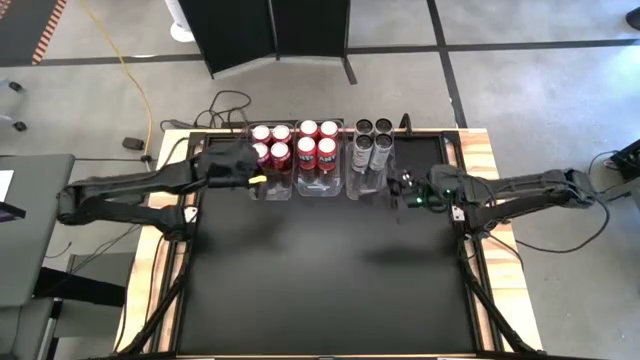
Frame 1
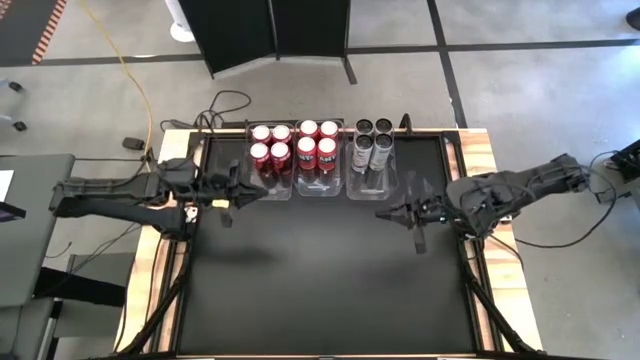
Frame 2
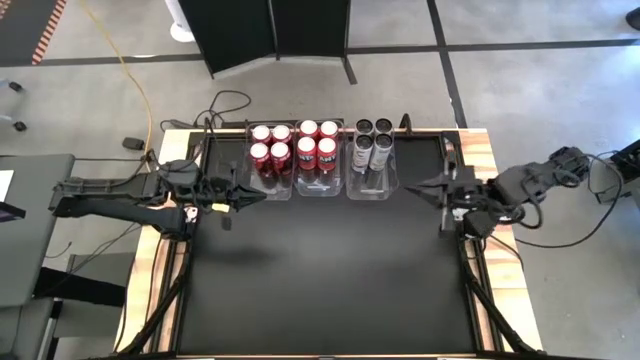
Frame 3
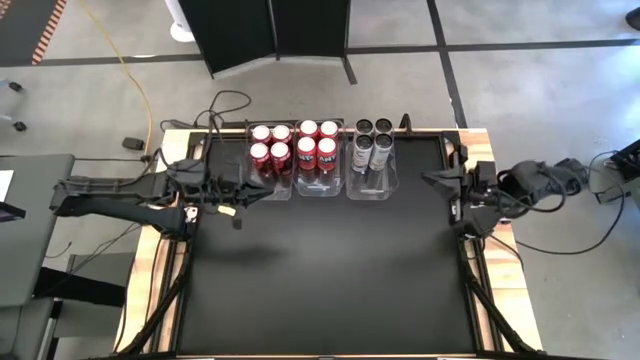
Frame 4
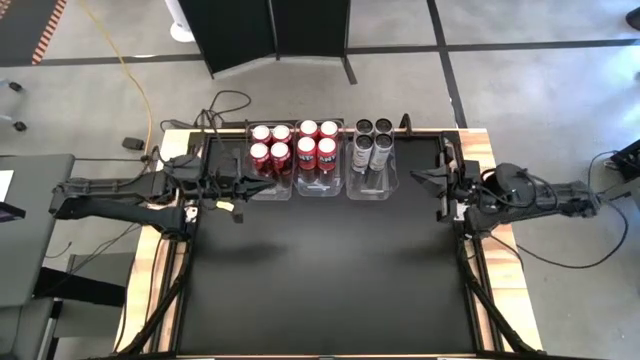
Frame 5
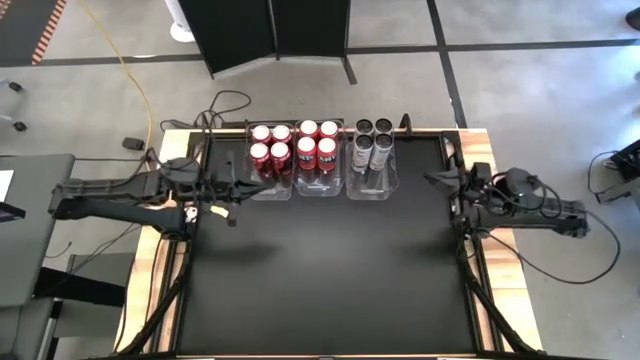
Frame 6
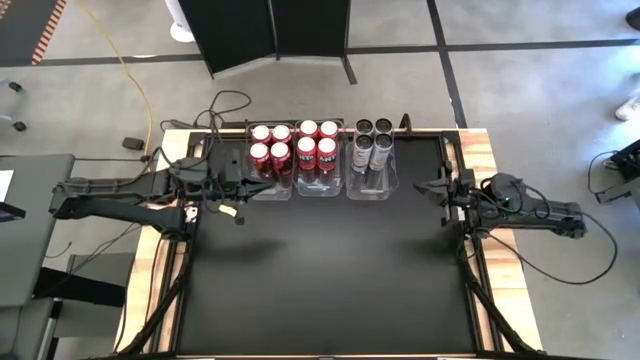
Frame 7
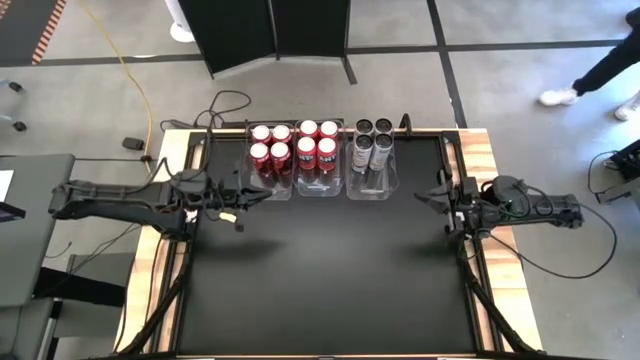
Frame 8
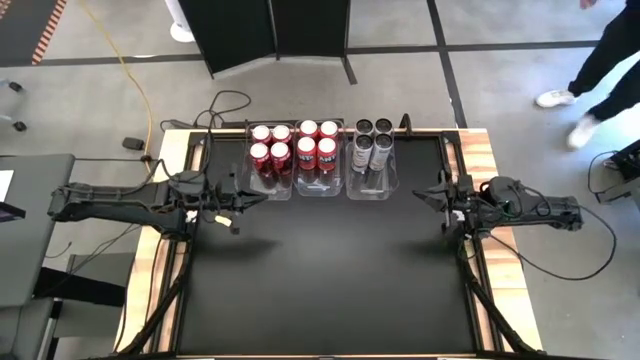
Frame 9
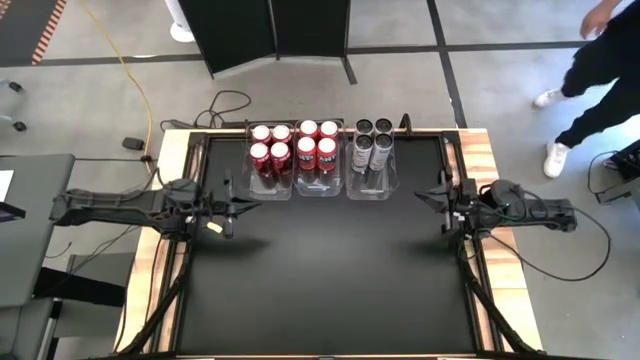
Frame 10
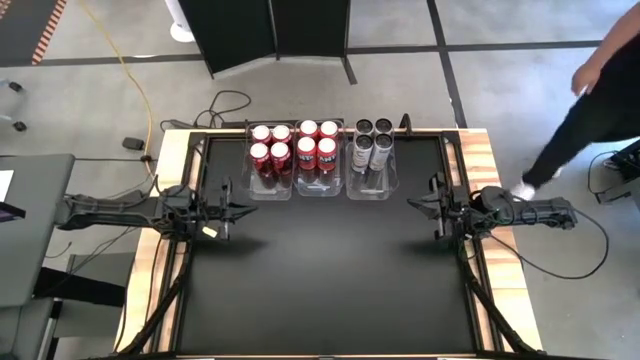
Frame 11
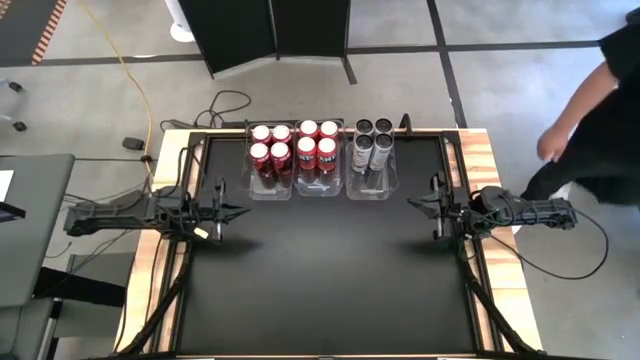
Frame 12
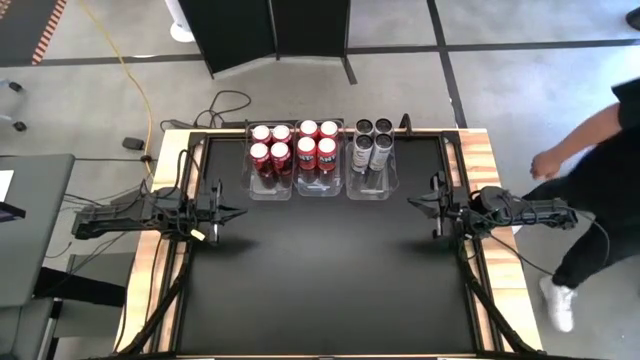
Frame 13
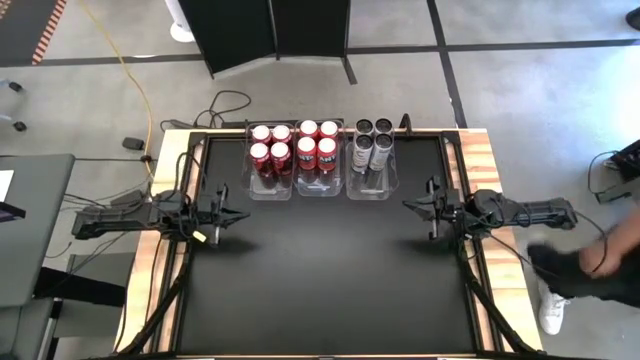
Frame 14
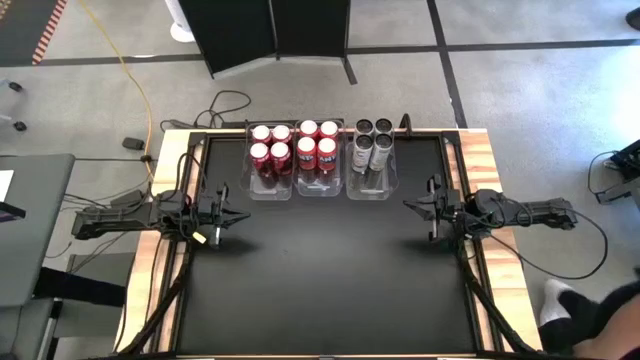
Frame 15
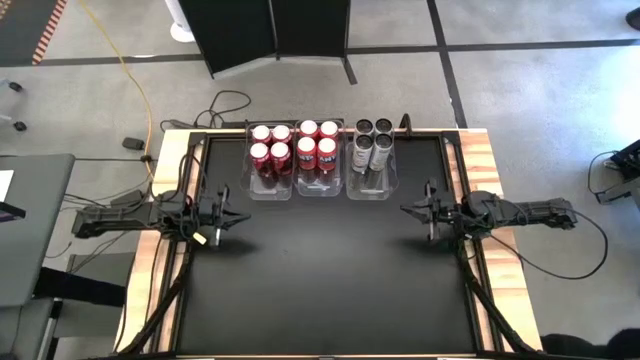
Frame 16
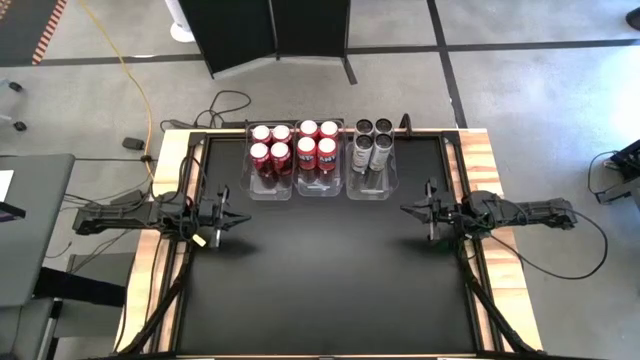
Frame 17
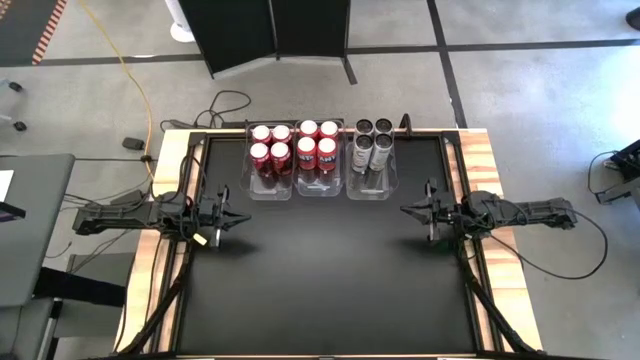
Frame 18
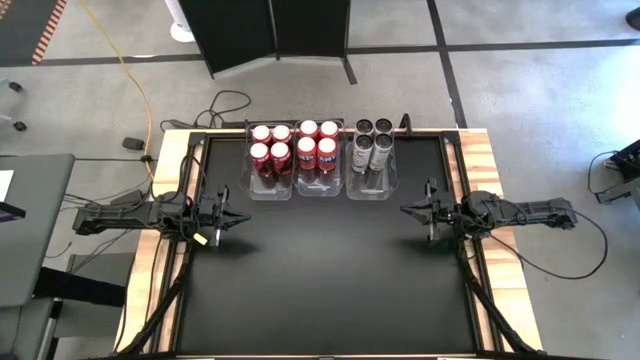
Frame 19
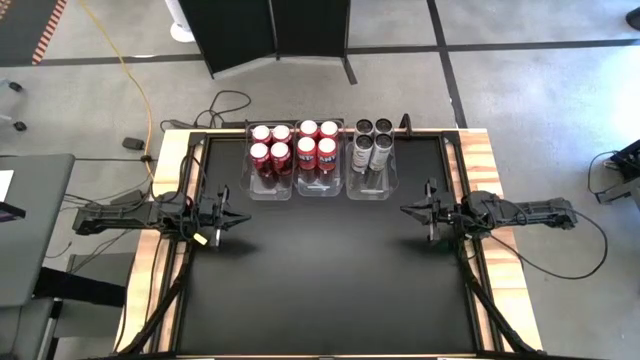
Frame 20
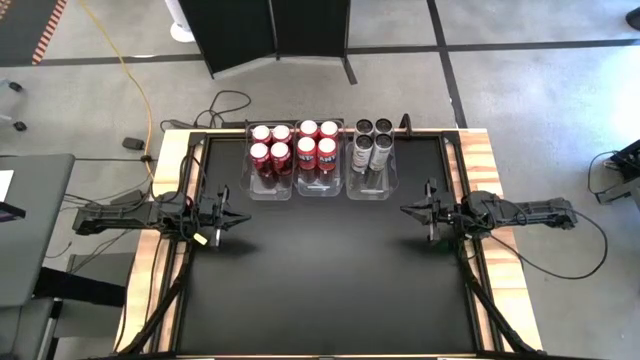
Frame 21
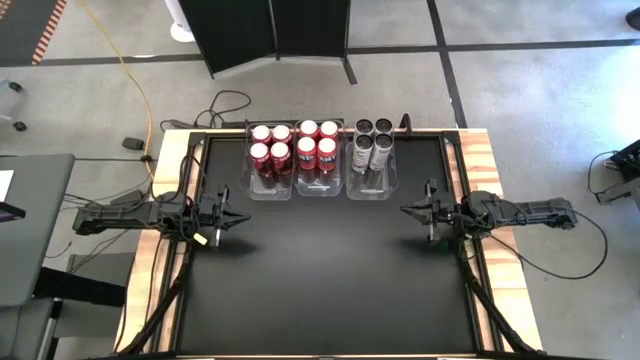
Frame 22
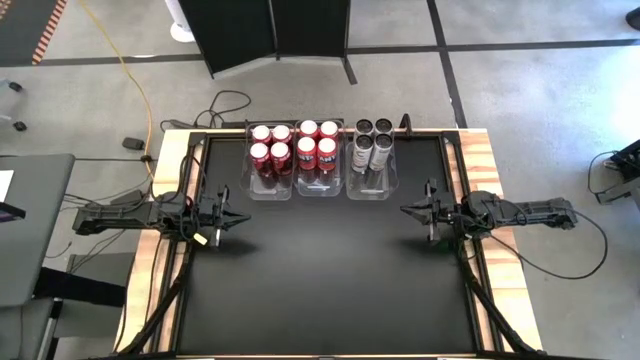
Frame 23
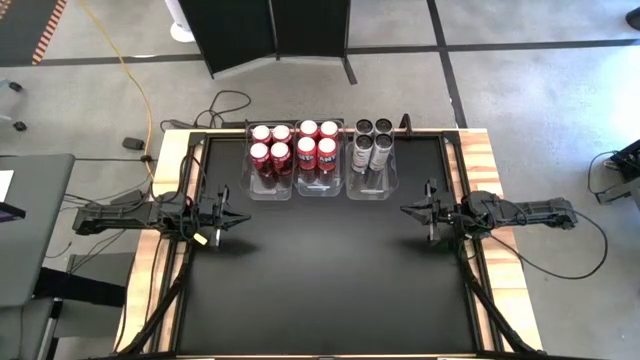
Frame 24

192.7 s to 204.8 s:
Task: Sort soda cans
Return to Home Position

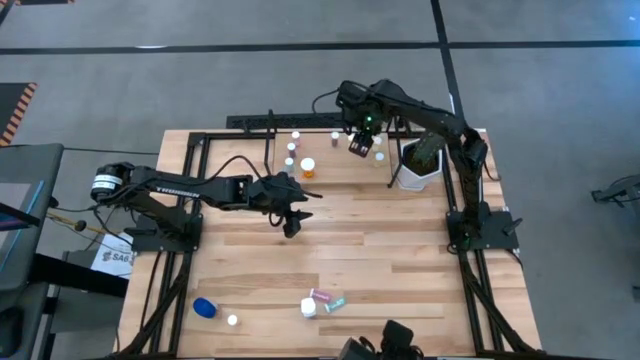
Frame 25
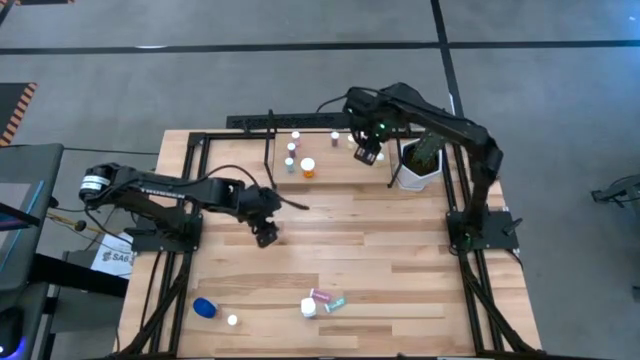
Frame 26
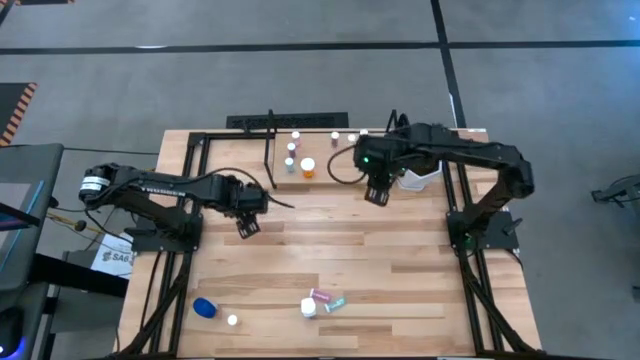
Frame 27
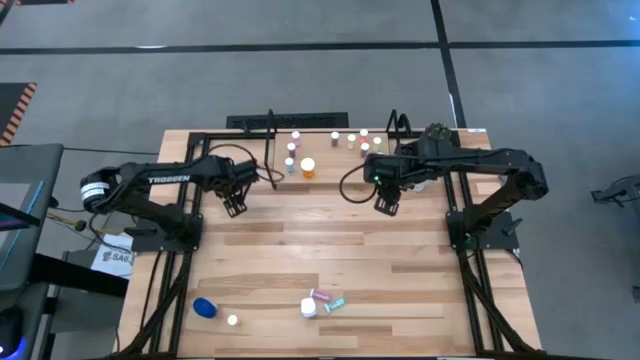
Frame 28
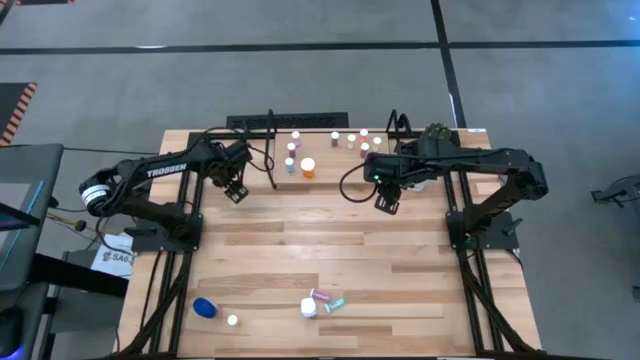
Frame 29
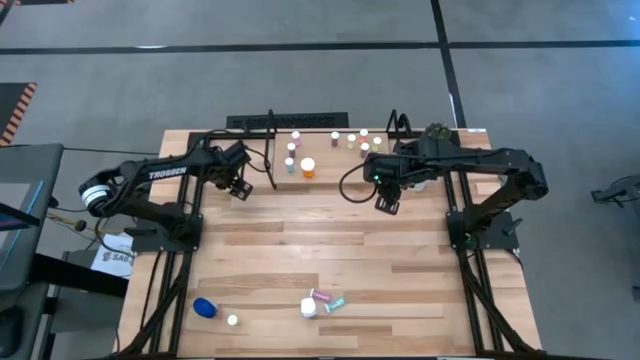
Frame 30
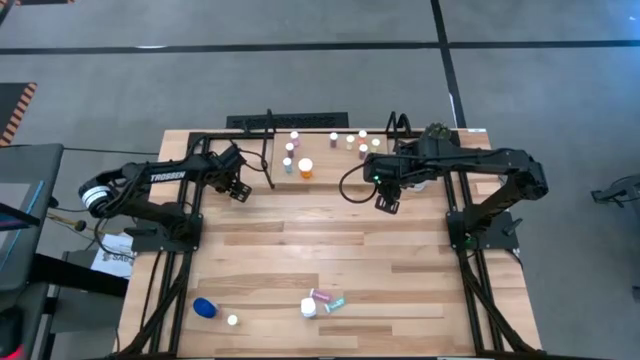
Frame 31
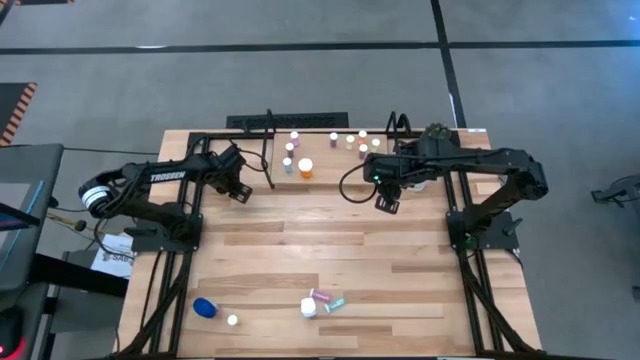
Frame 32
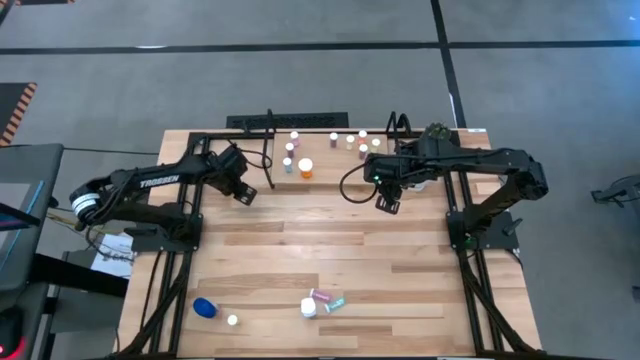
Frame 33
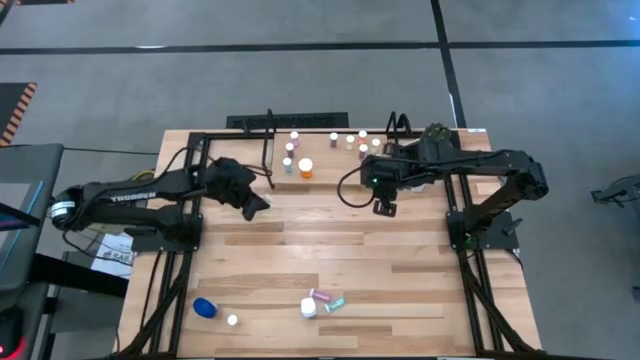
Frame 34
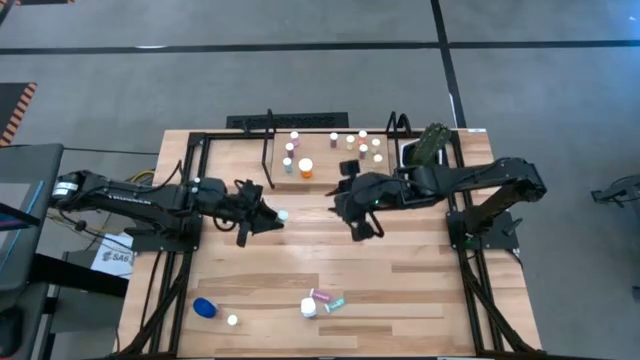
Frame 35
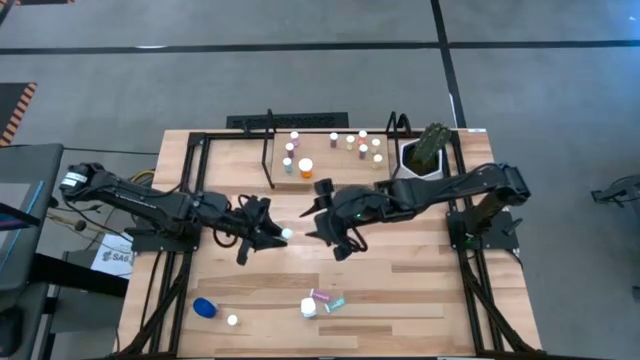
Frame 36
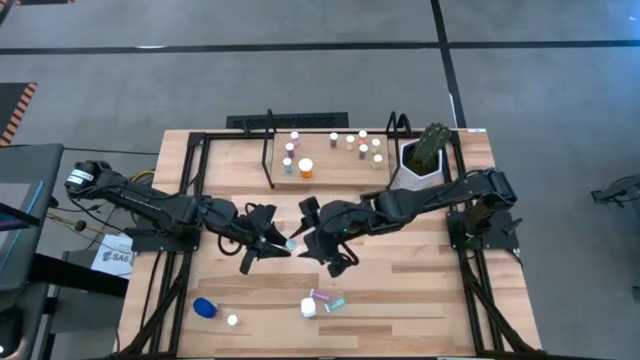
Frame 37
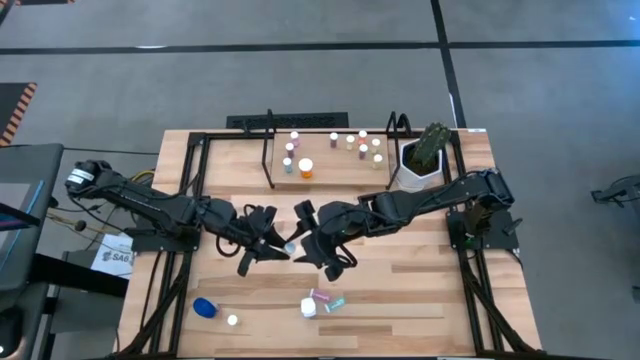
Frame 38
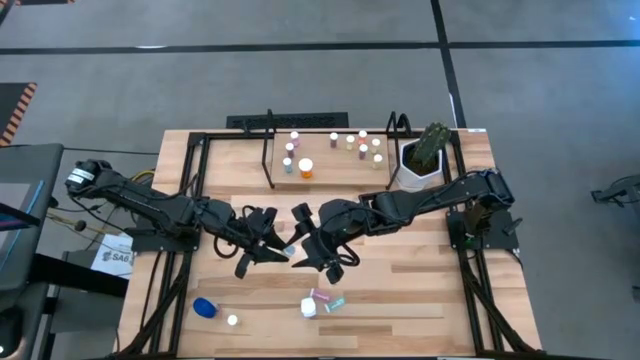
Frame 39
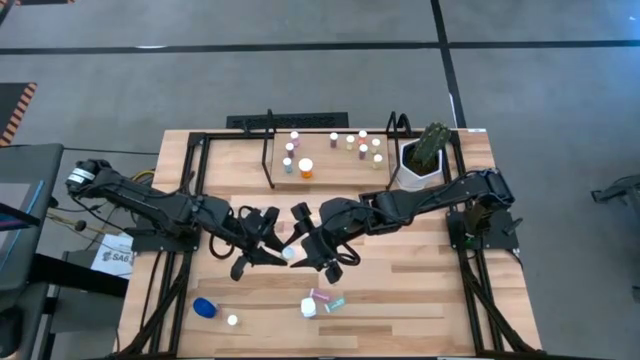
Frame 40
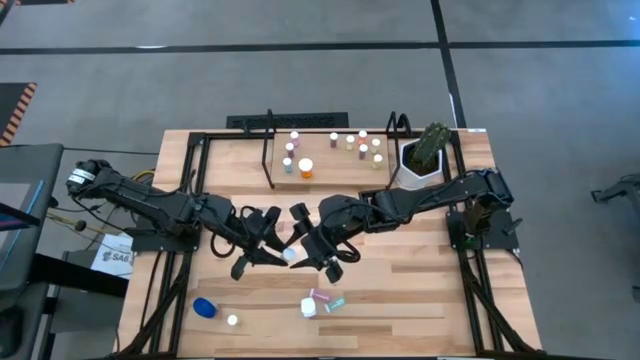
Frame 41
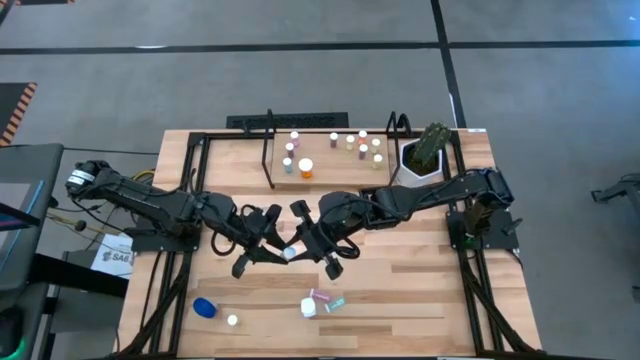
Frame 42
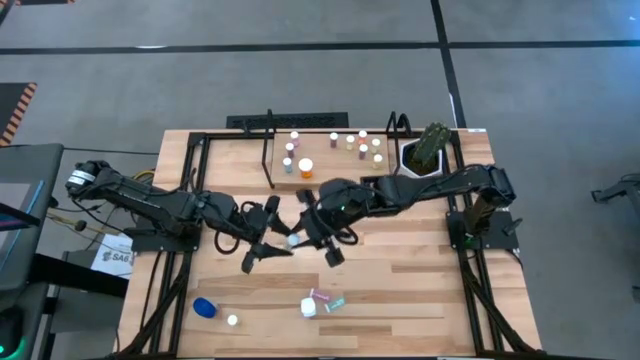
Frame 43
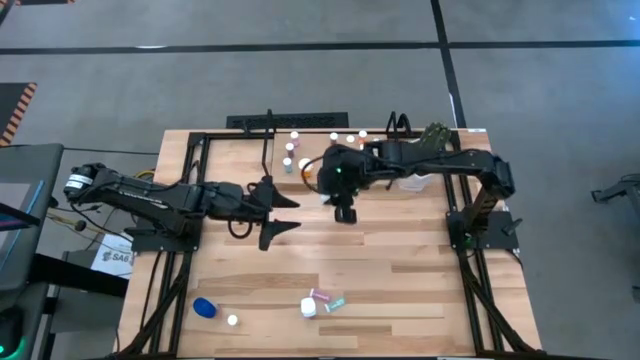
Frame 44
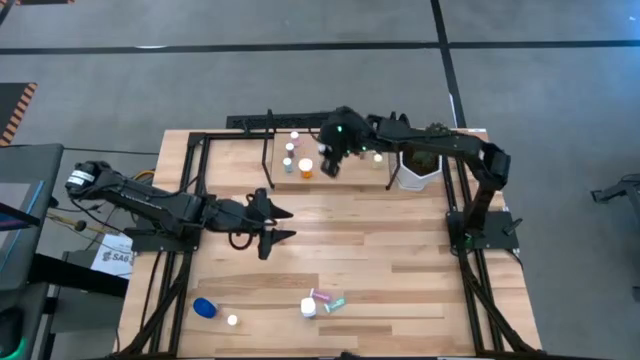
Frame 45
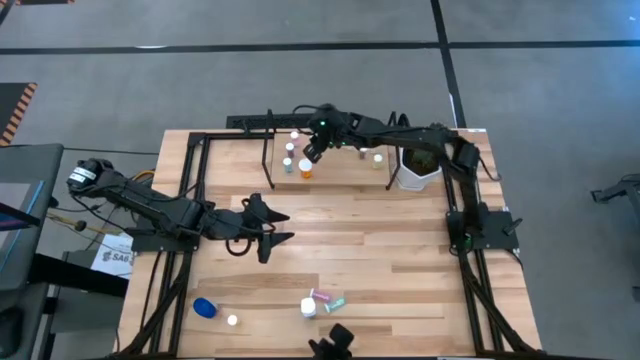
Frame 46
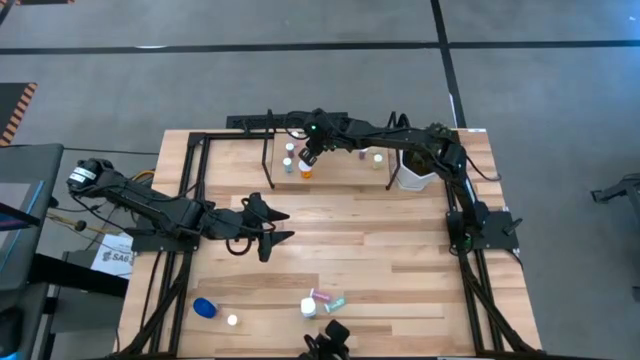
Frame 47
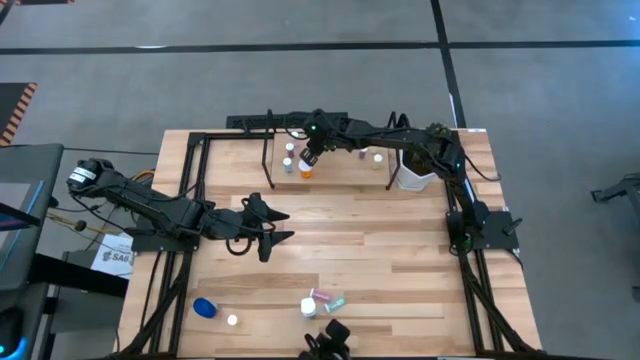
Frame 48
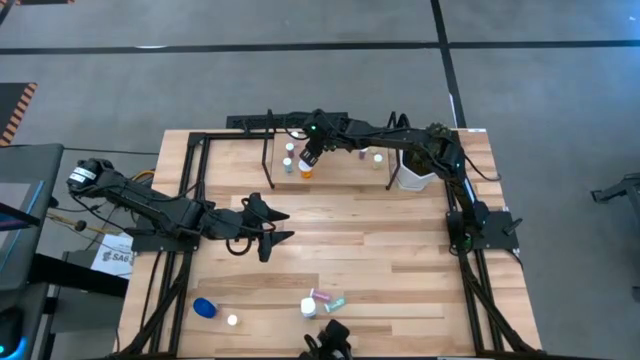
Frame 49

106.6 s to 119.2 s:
Task: Pick and place medicine bottles onto shelf by color
Put the yellow pill bottle on the shelf
